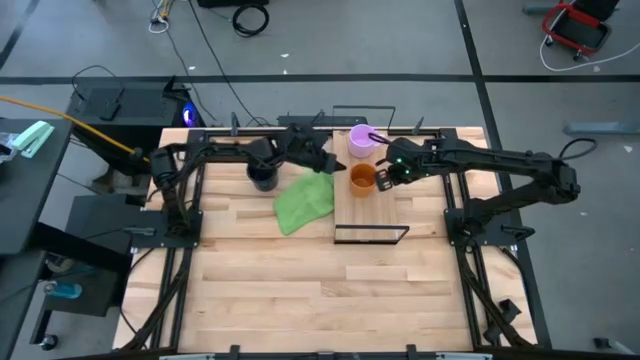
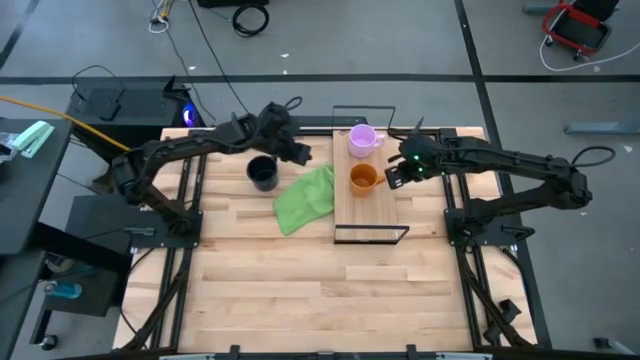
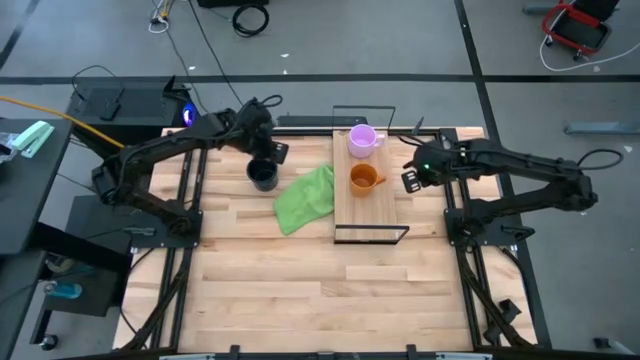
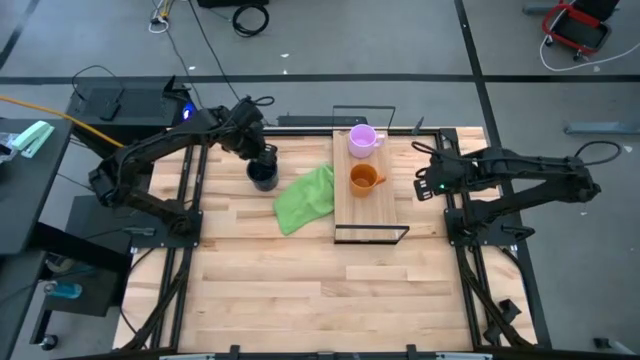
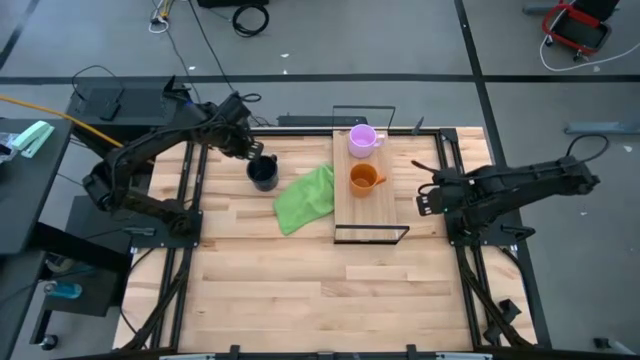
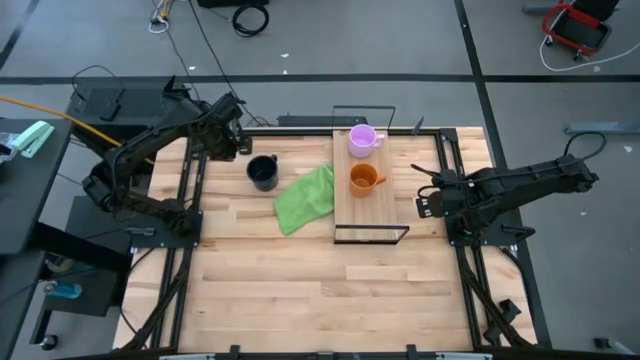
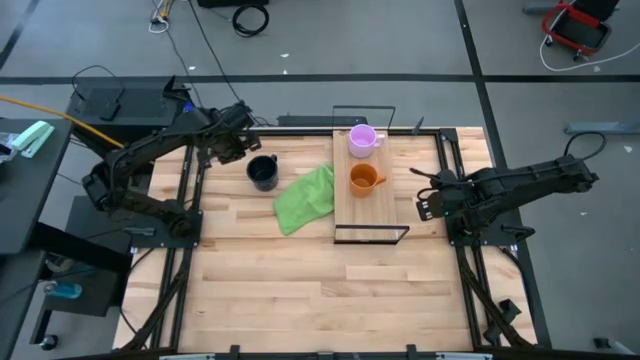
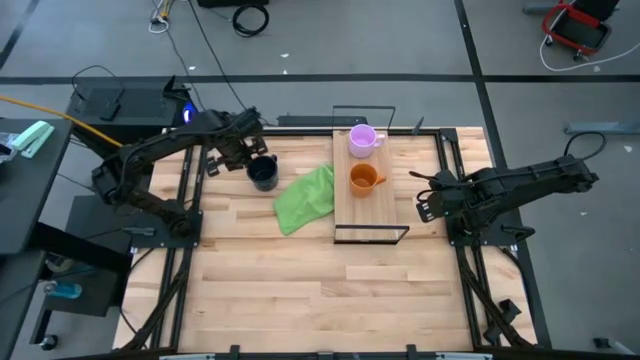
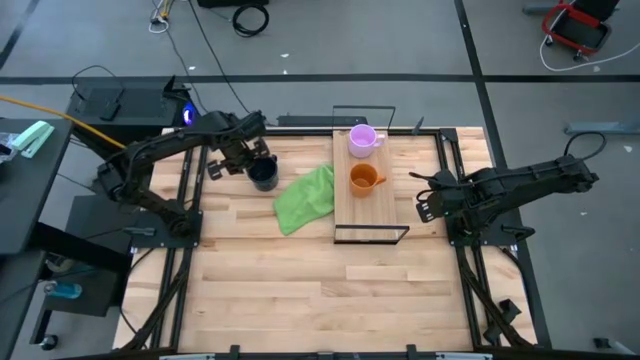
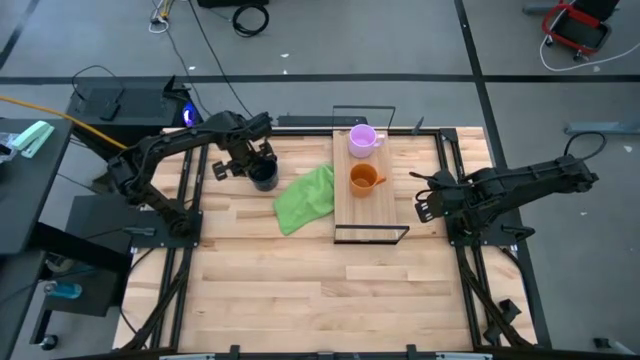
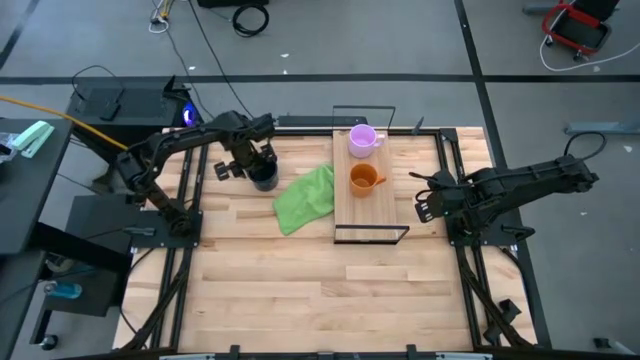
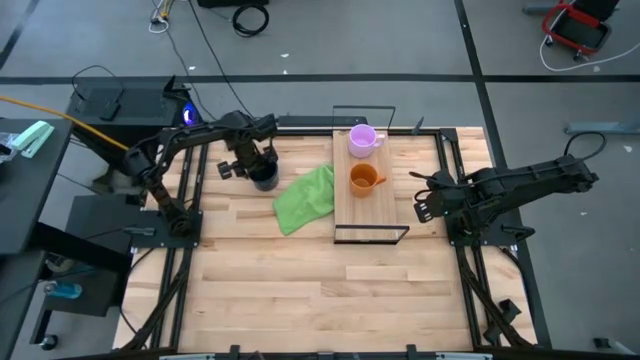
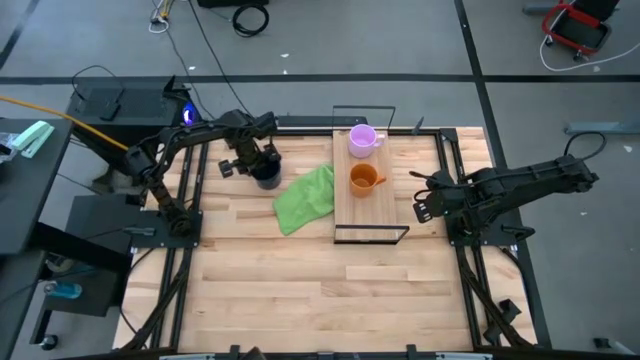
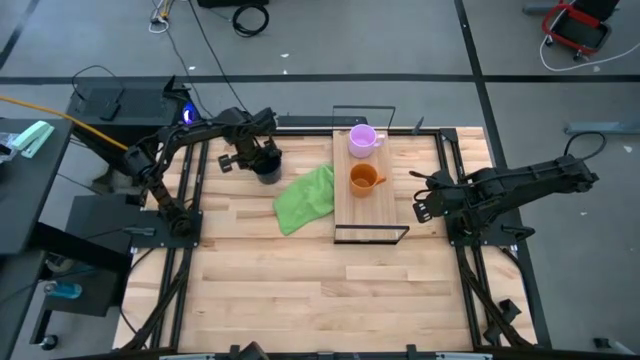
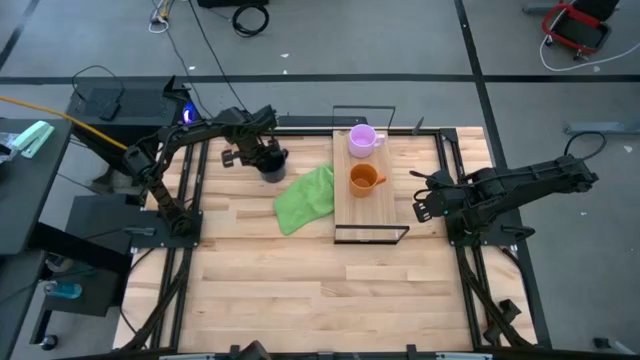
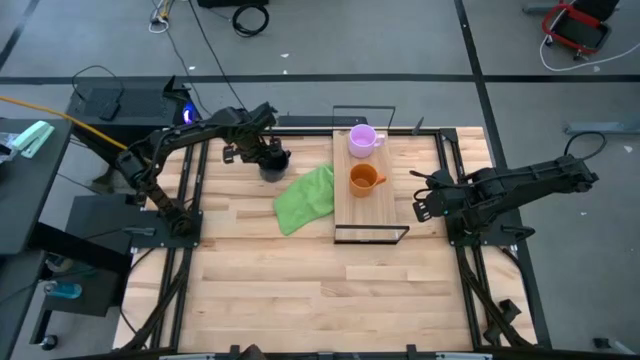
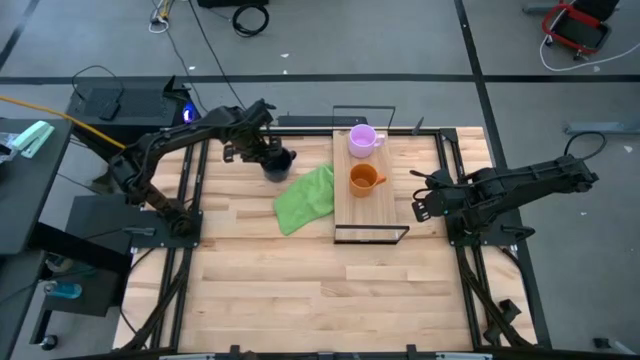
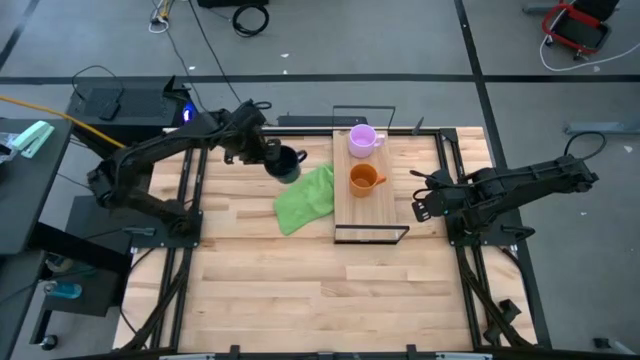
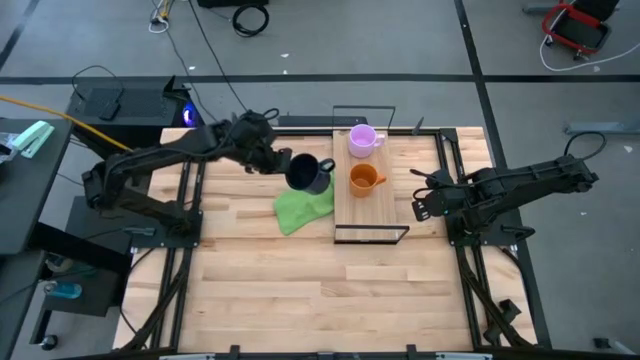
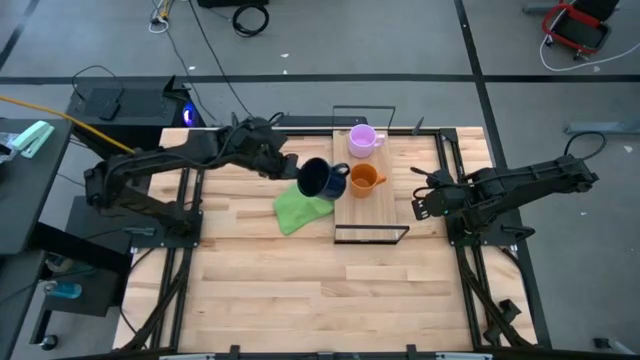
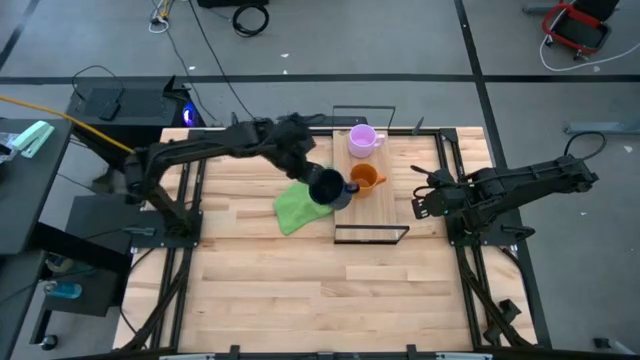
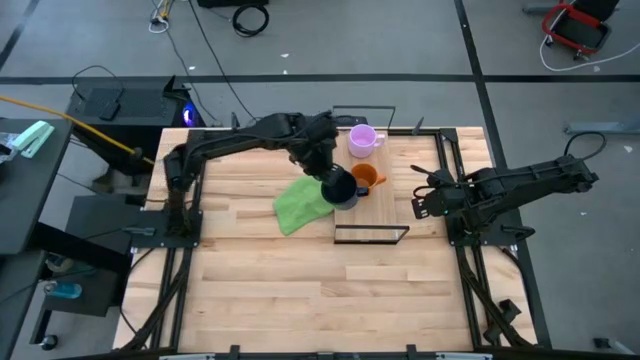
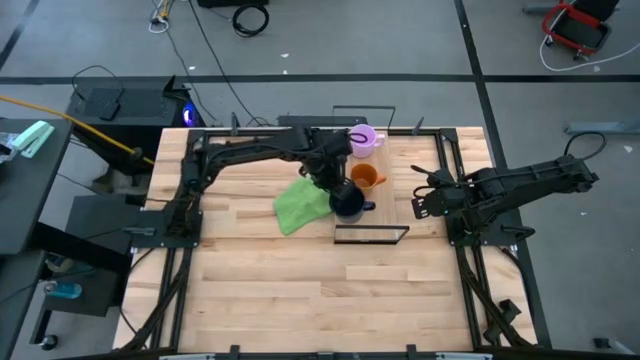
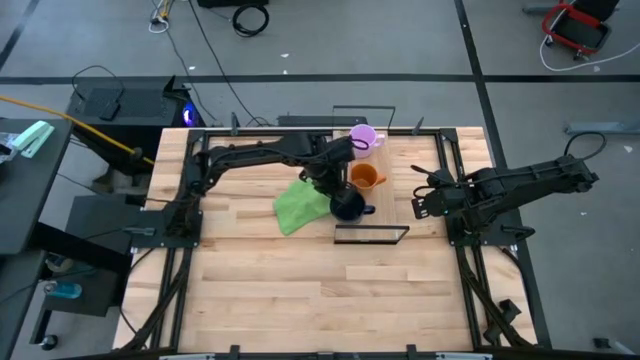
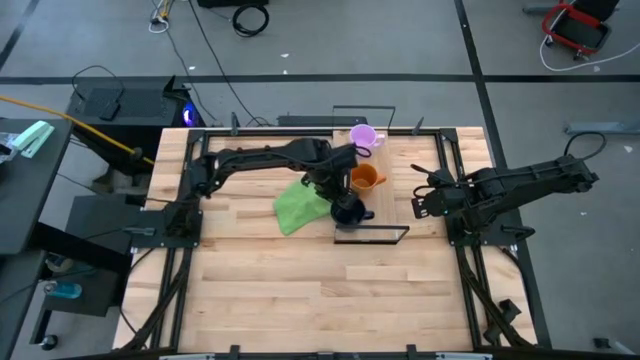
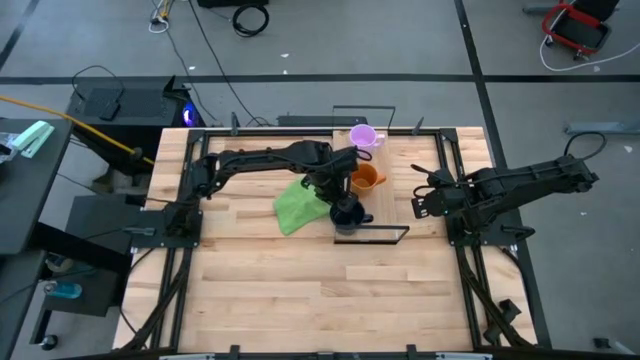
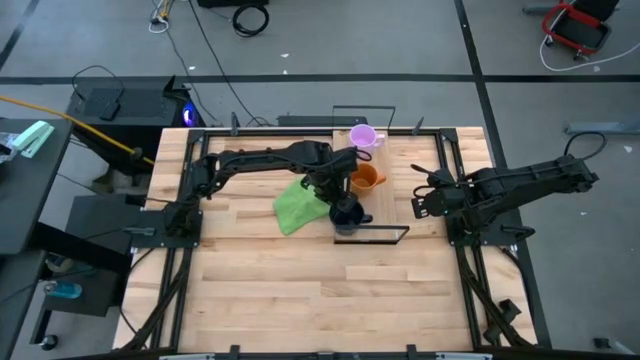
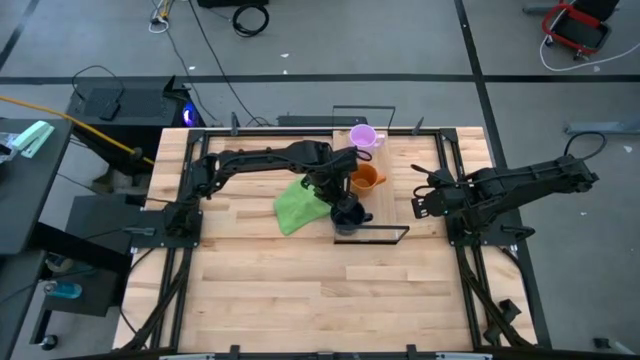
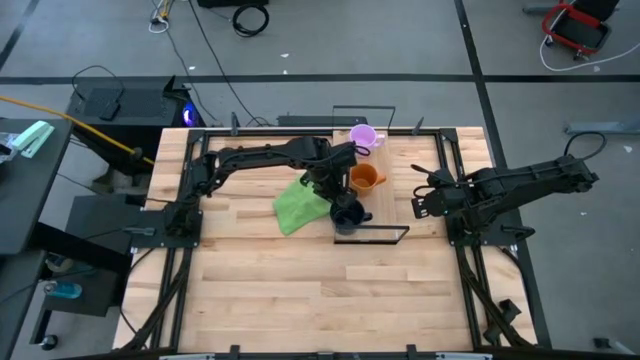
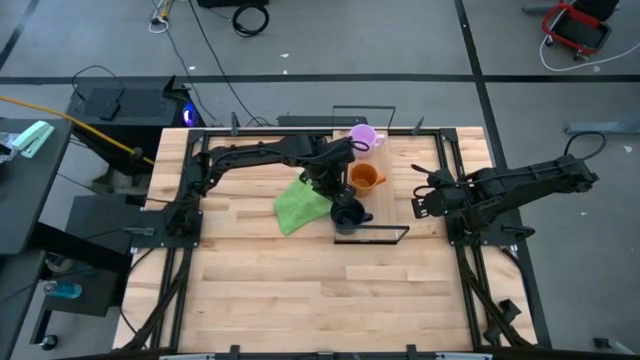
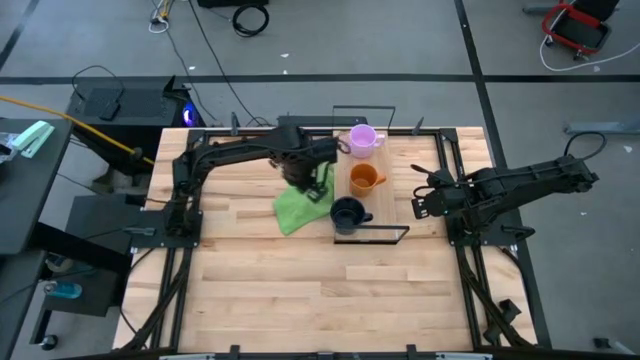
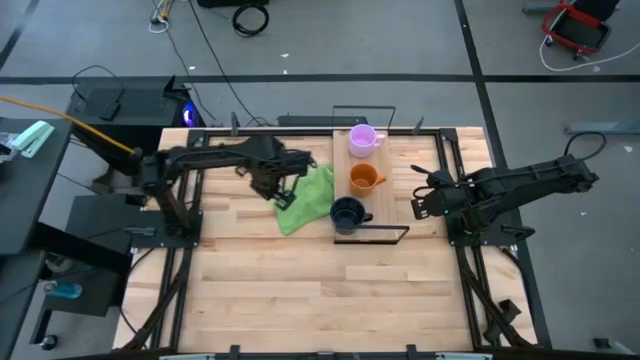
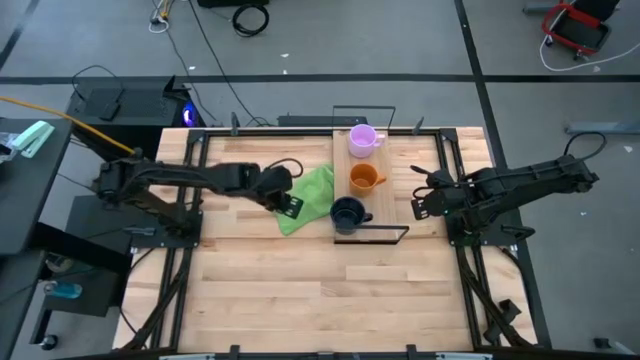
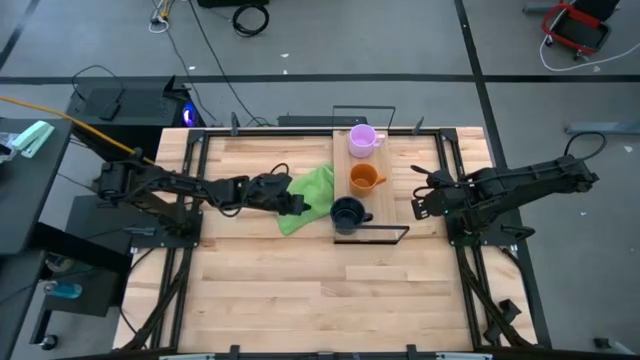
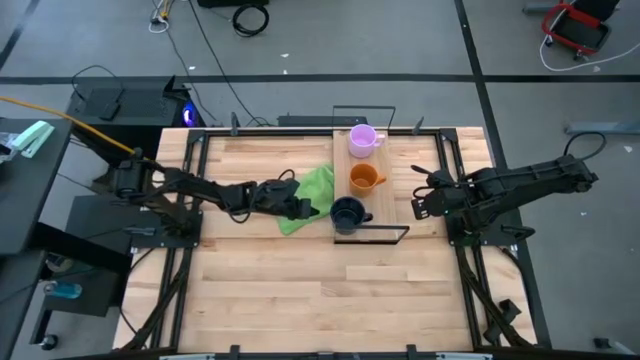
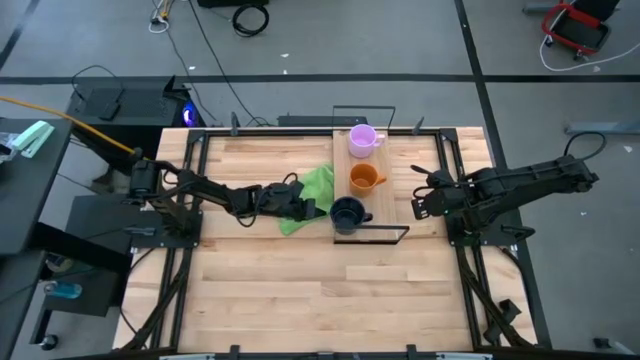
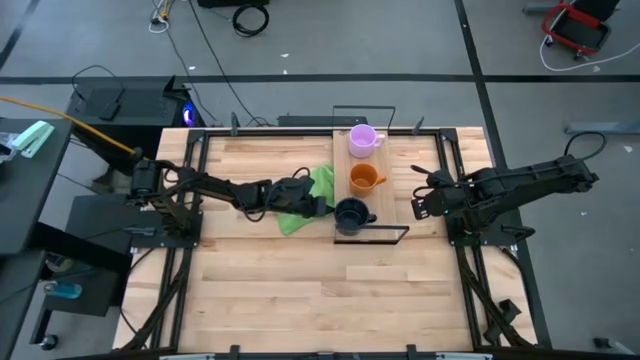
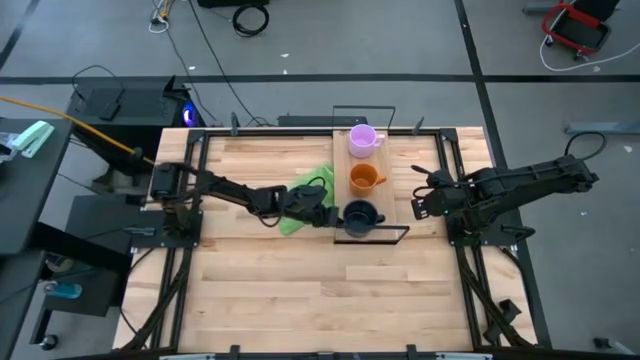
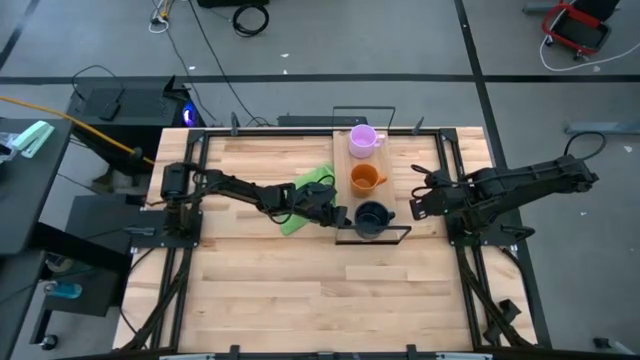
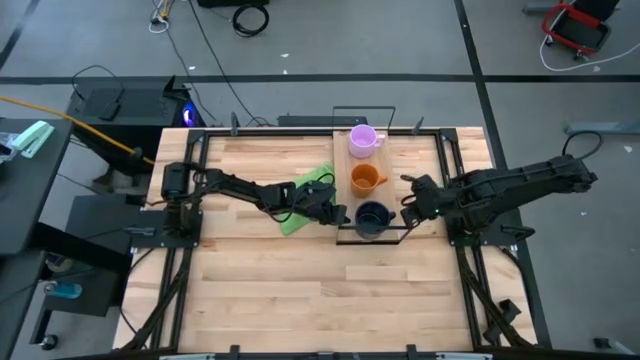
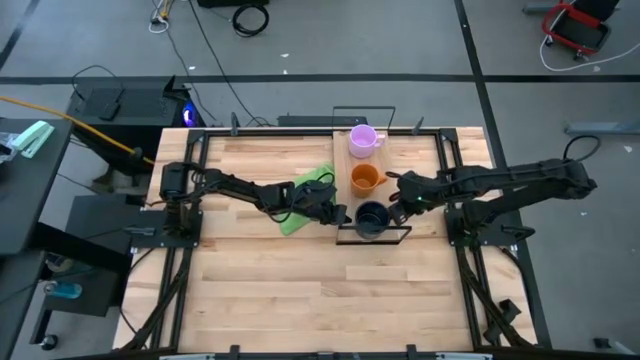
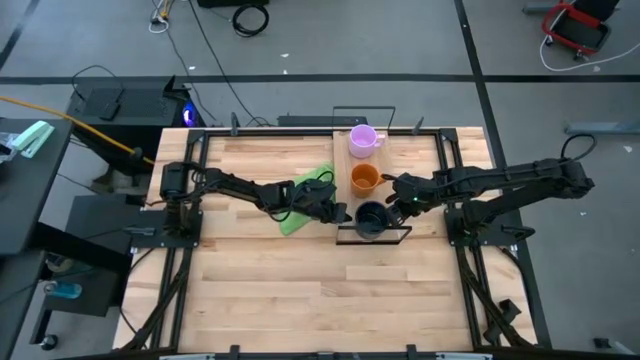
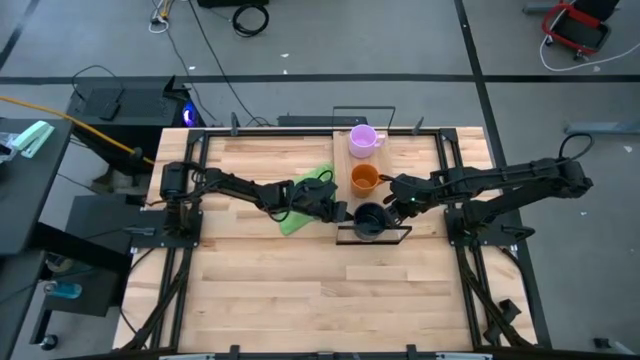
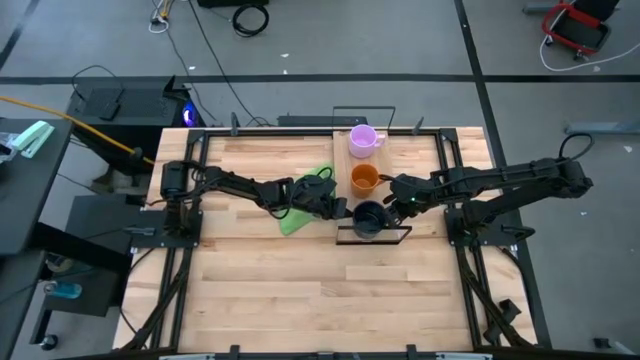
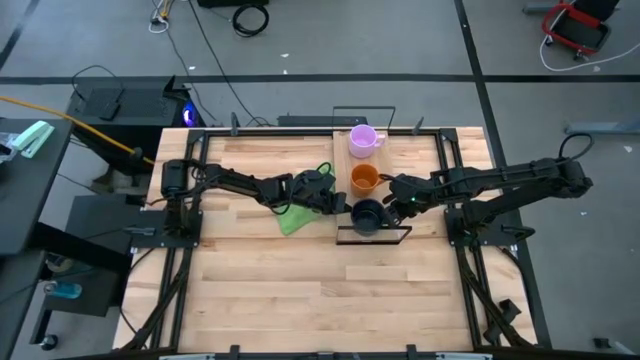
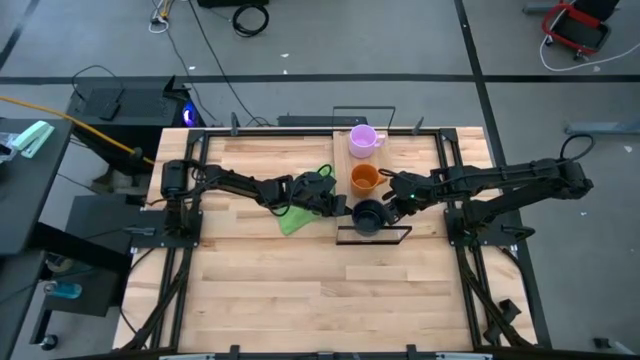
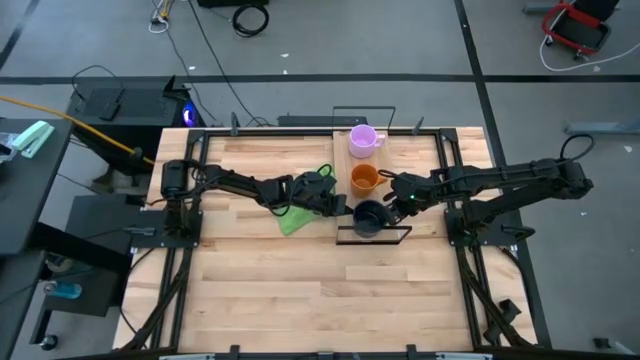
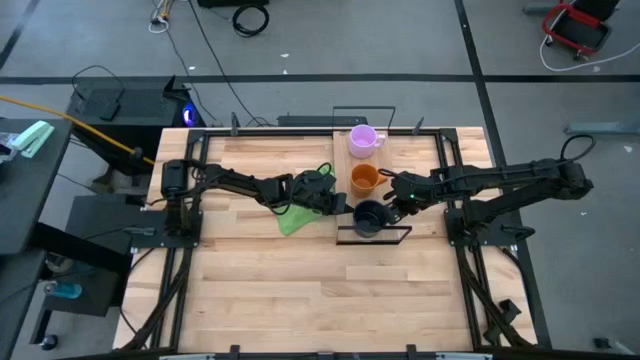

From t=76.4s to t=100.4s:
Task: Stack small to large cups/mugs on shelf
Put the blue mug on the shelf
